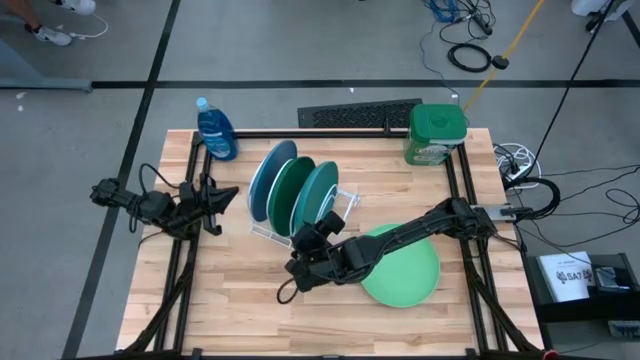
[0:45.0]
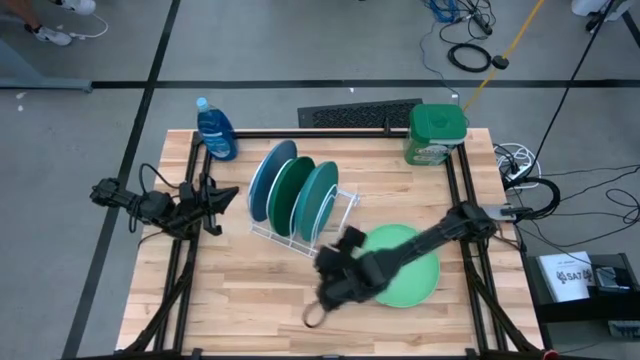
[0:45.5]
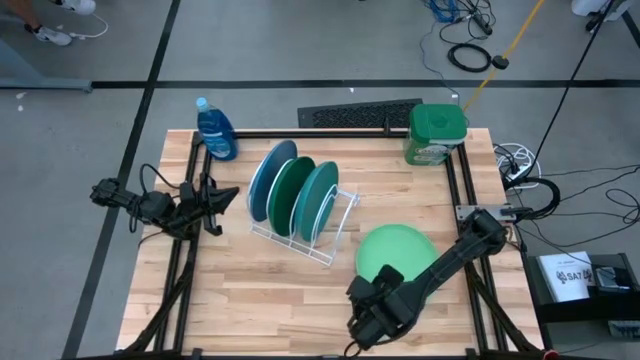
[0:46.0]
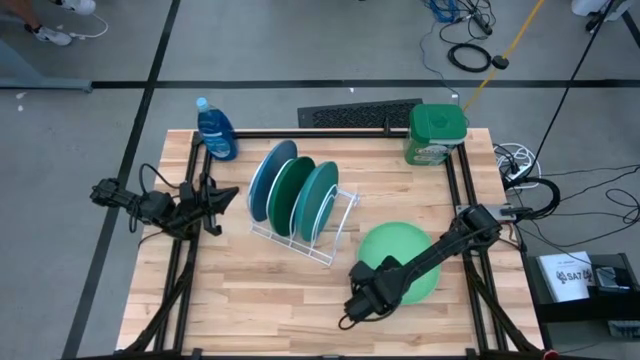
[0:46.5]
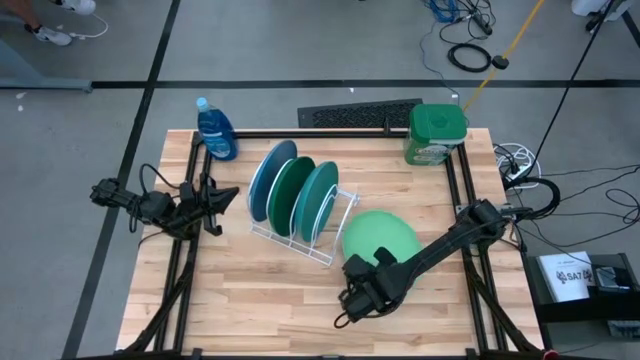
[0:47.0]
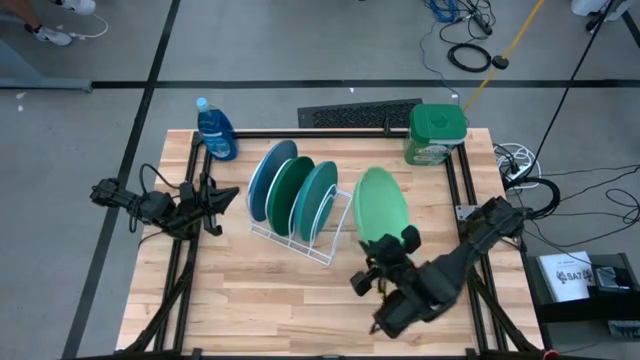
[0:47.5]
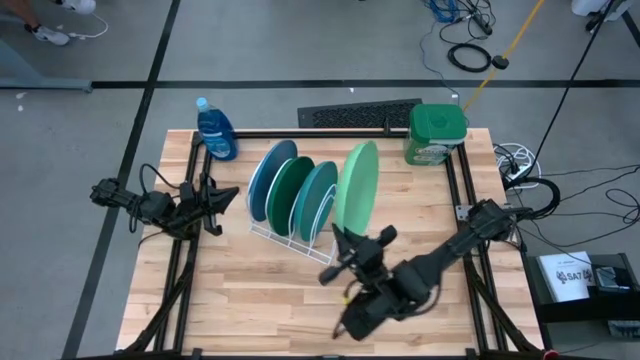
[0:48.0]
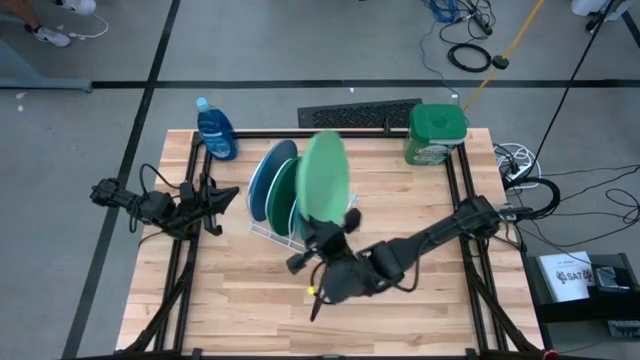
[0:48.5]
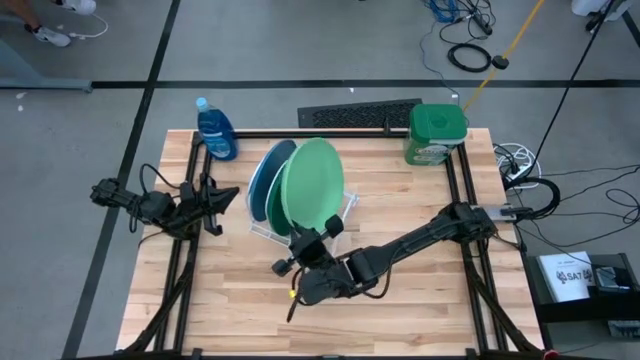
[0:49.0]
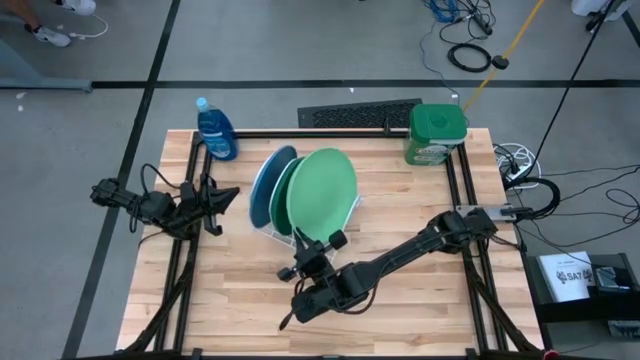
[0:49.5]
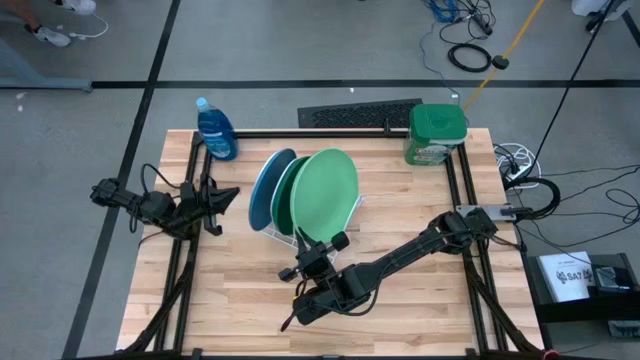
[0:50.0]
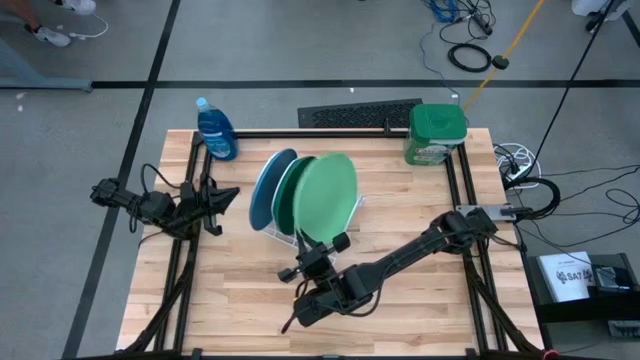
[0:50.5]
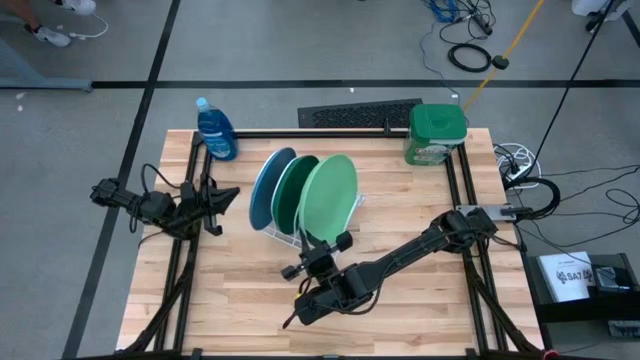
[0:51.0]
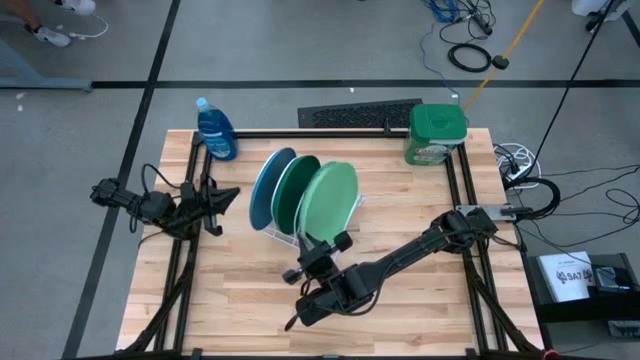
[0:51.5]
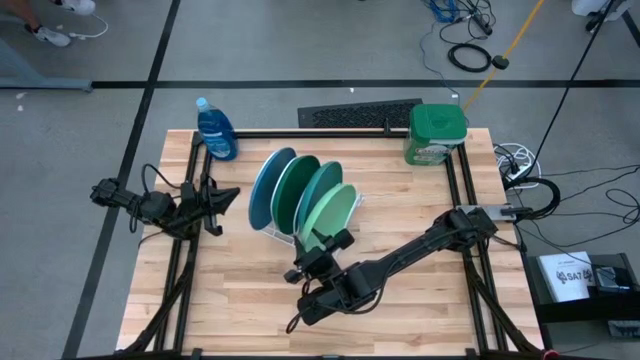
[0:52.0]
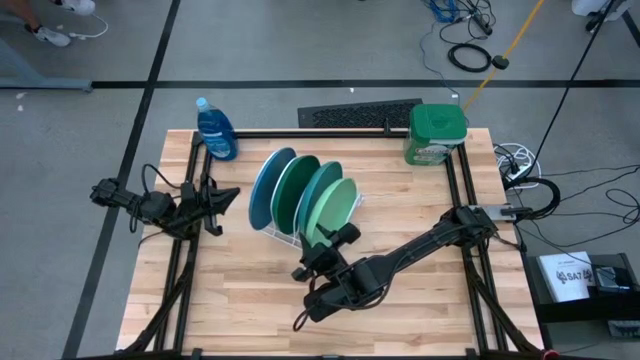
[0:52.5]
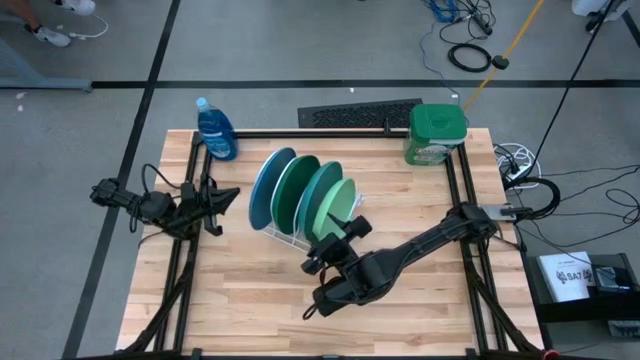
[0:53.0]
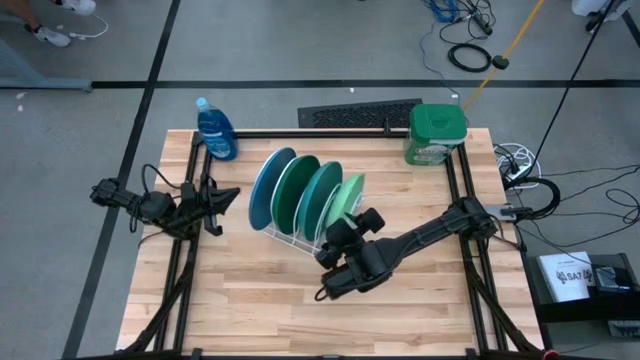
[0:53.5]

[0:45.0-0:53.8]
Task: Sort dishes
Put the light green plate into the white dish rack

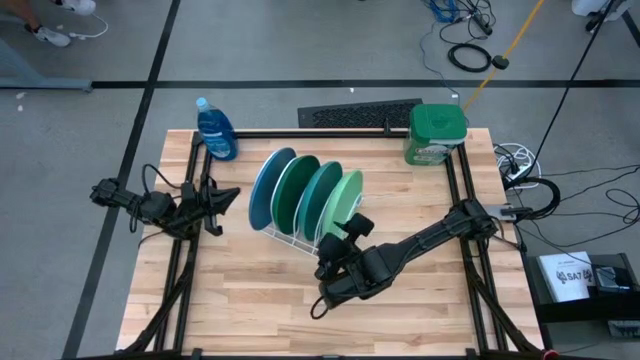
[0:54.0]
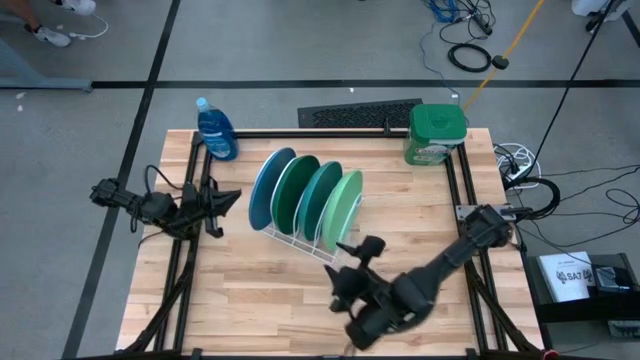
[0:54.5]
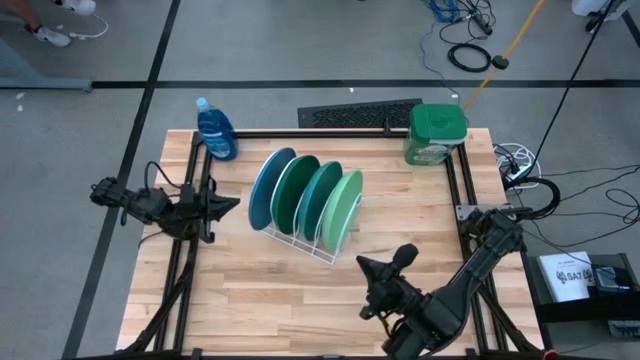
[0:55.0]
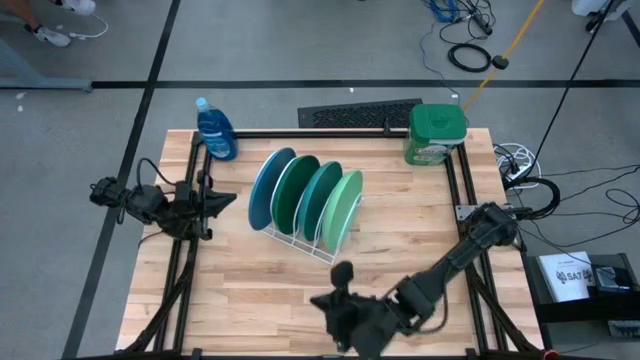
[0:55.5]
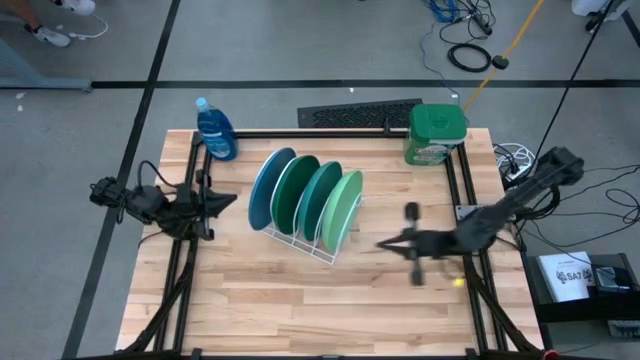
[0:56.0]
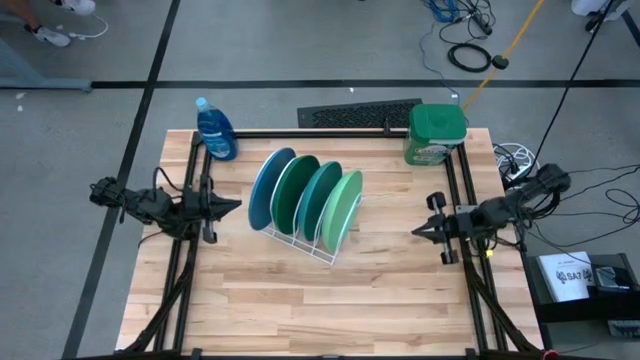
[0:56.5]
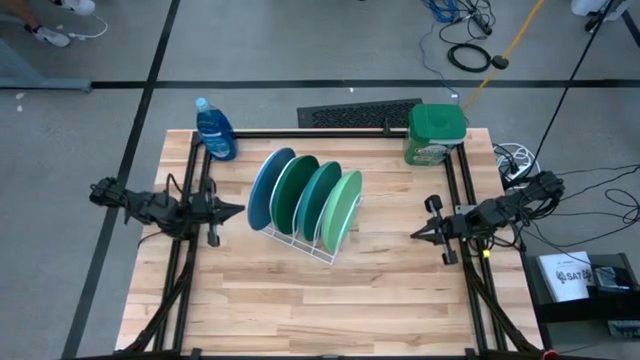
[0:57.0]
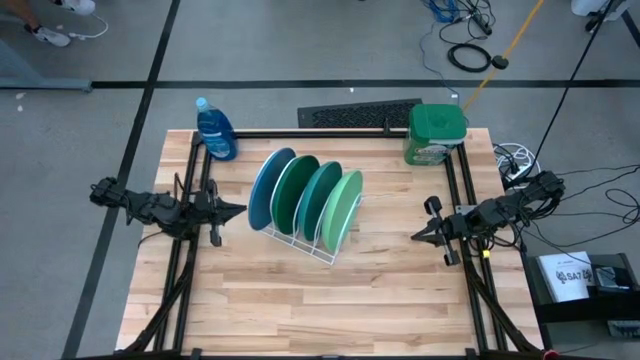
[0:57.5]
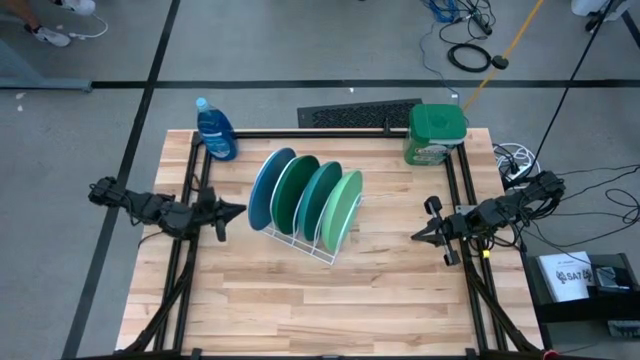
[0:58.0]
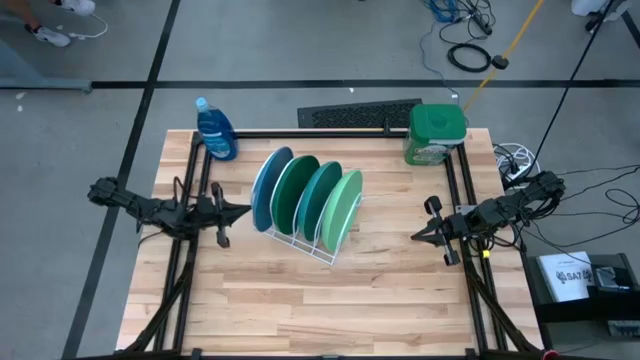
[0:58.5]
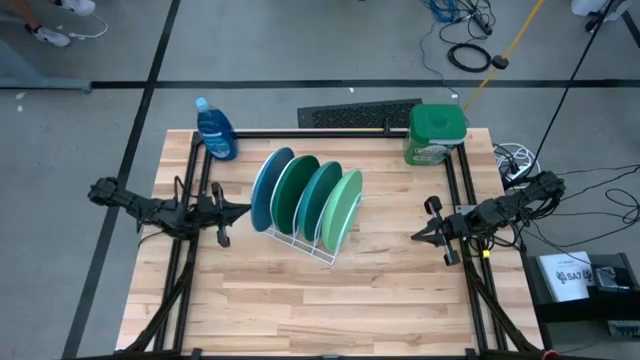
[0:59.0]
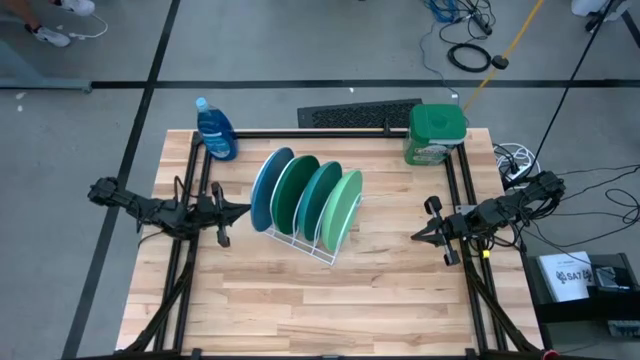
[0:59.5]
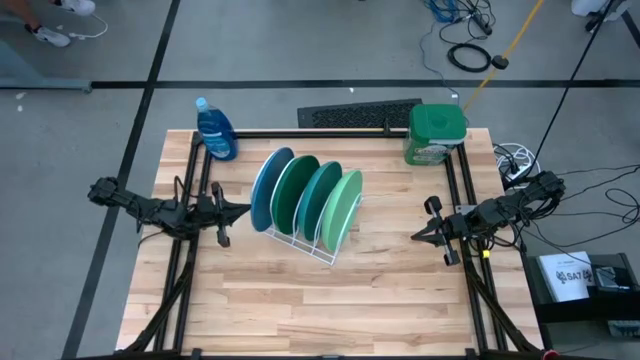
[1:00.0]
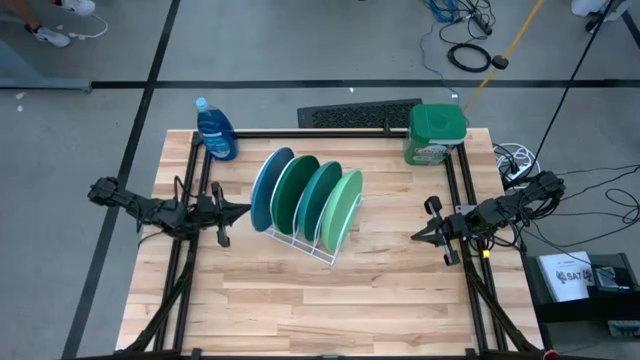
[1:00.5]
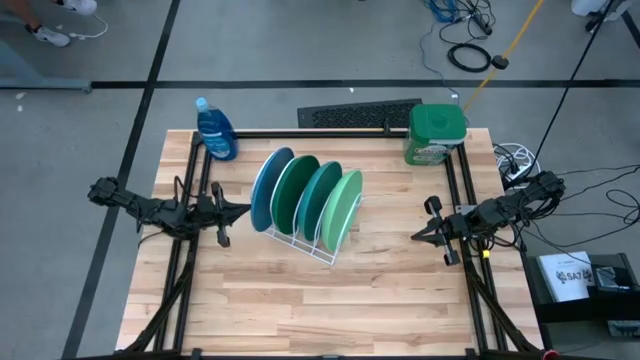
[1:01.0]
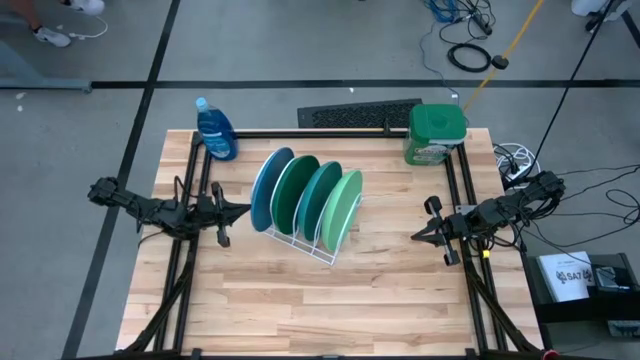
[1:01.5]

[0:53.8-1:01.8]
Return to Home Position

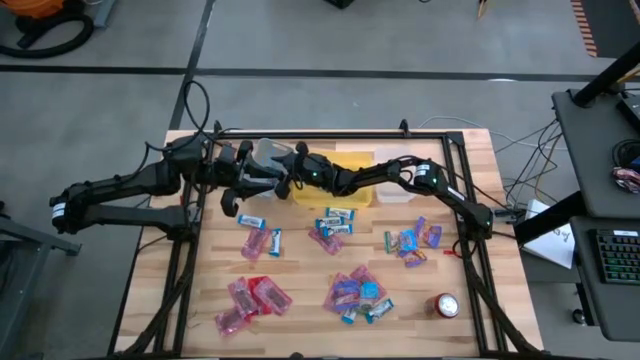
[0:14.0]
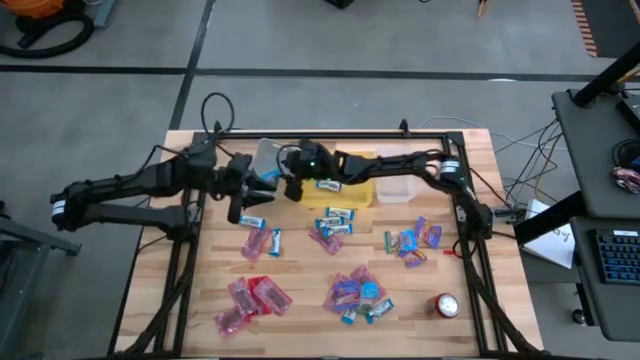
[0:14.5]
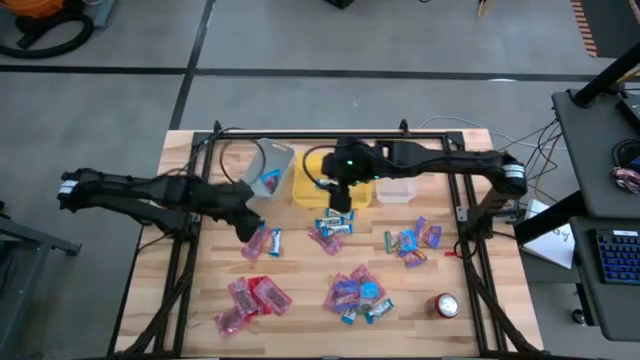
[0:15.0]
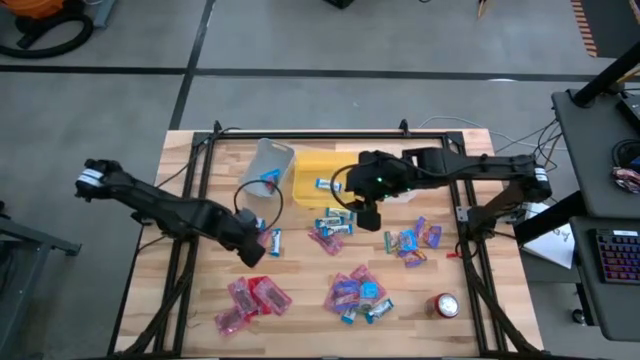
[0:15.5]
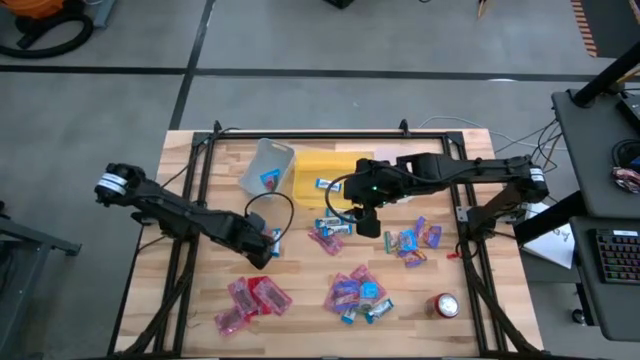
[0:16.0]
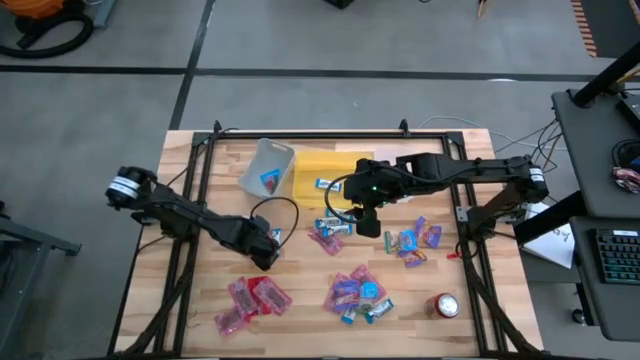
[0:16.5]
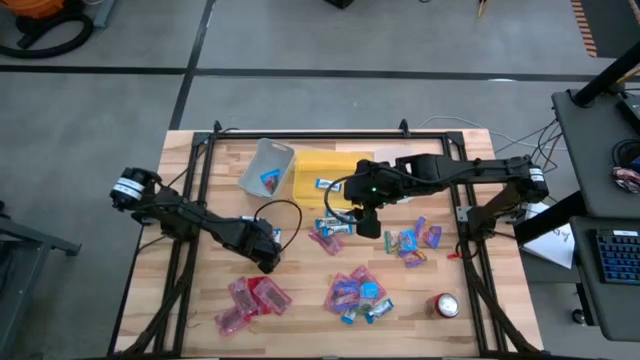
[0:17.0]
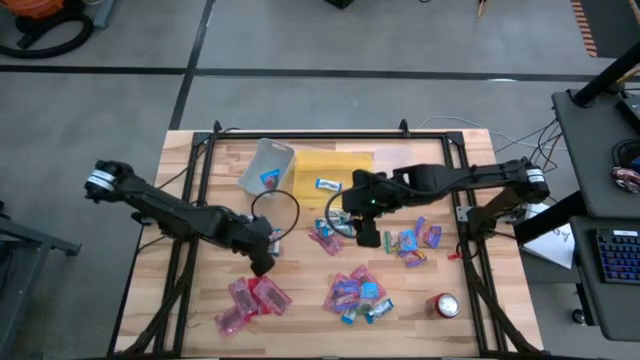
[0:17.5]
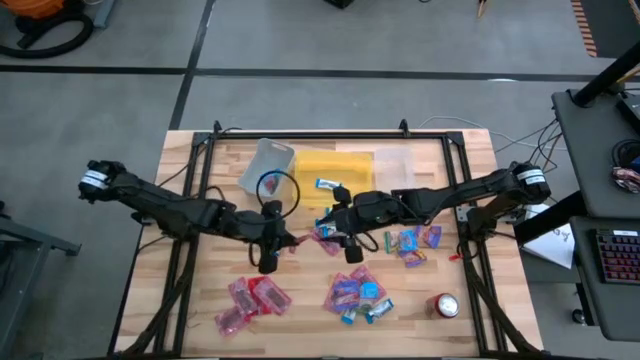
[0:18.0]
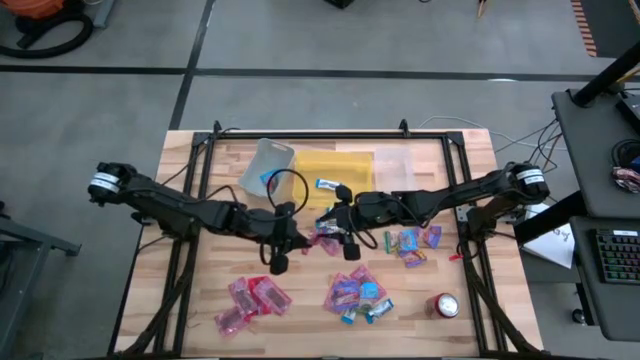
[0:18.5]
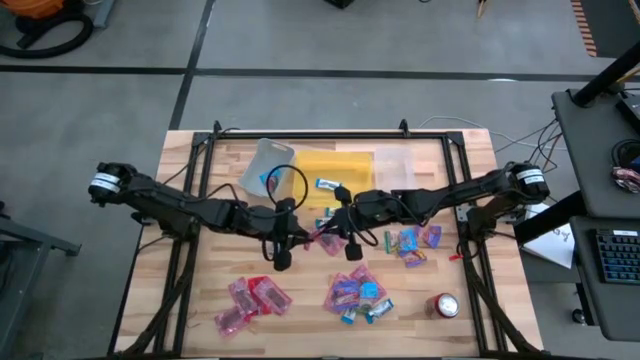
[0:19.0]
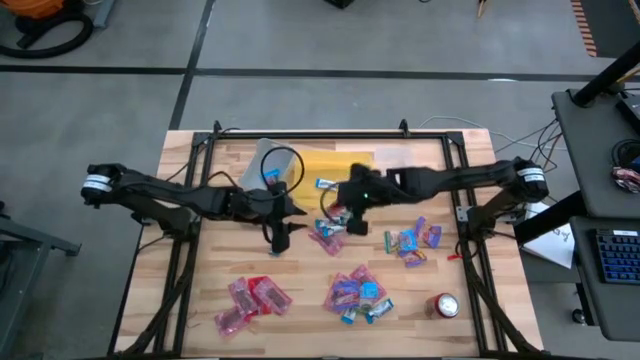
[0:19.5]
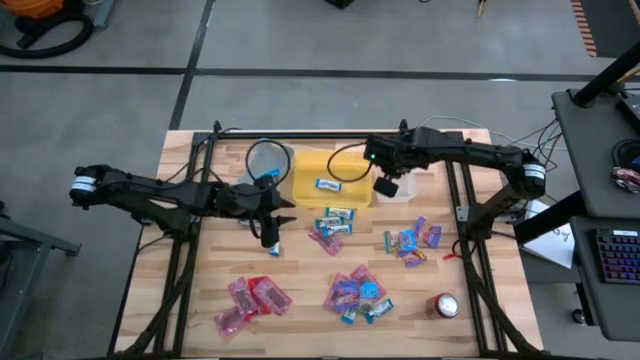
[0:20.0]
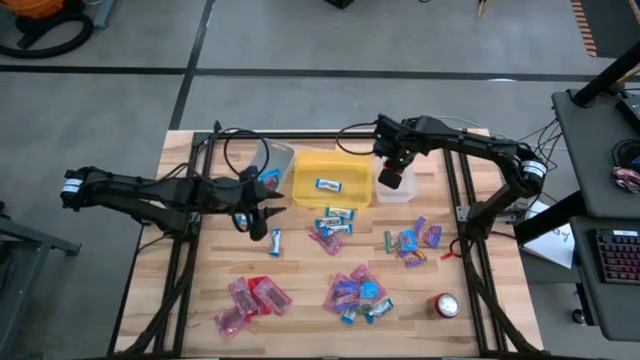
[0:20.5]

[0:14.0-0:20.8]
Task: Sort candy
Put the red candy into the transparent bin
